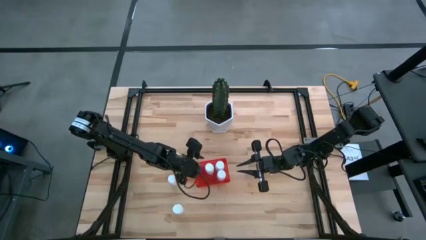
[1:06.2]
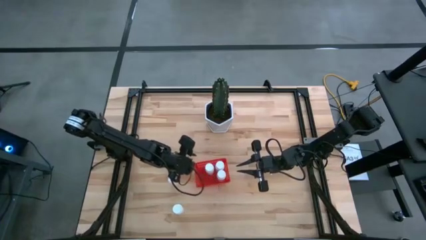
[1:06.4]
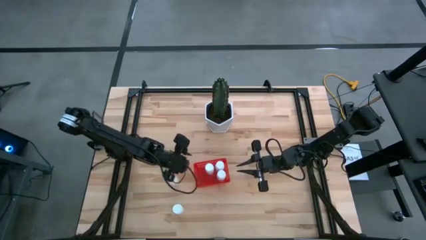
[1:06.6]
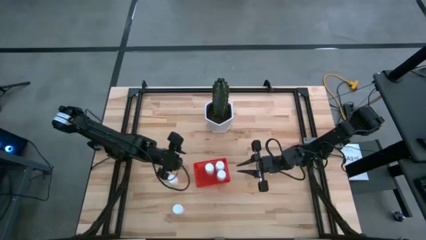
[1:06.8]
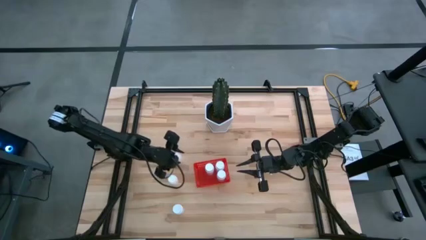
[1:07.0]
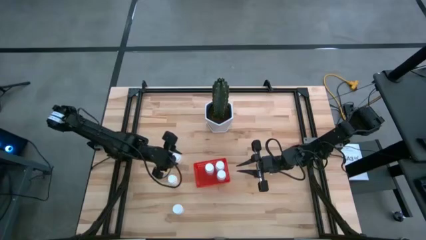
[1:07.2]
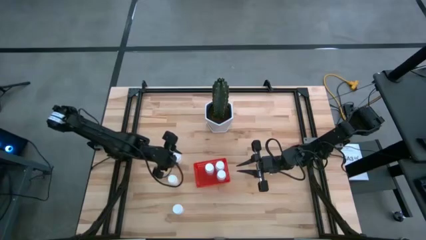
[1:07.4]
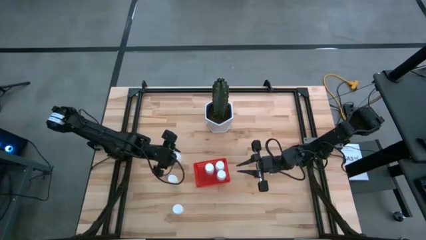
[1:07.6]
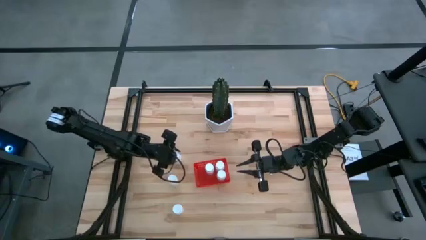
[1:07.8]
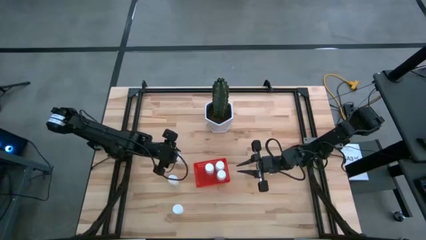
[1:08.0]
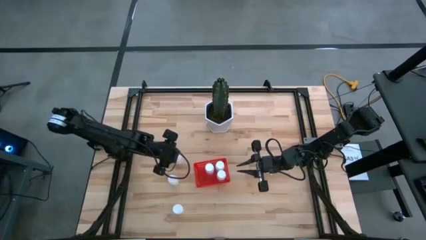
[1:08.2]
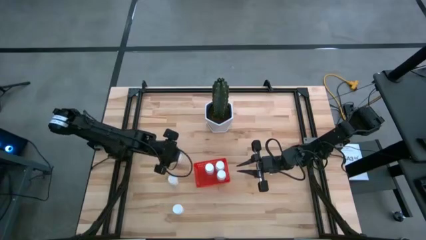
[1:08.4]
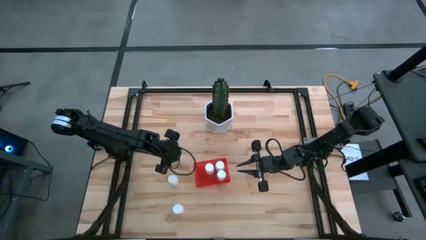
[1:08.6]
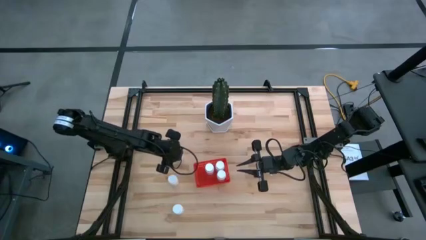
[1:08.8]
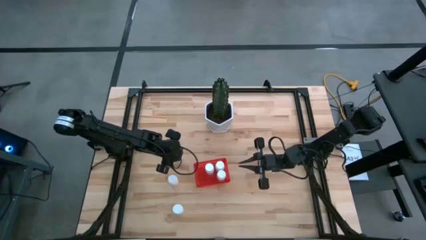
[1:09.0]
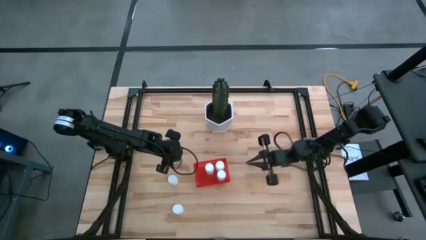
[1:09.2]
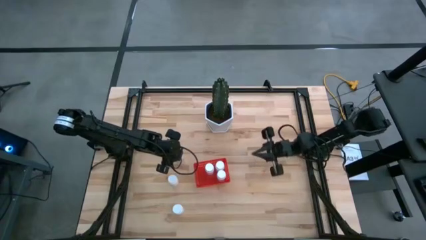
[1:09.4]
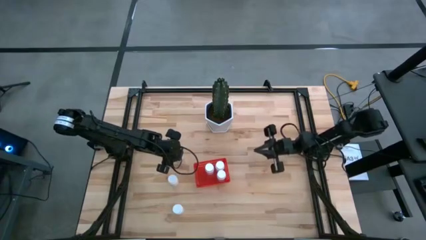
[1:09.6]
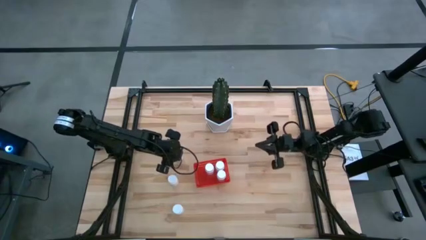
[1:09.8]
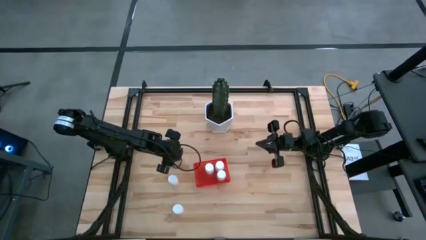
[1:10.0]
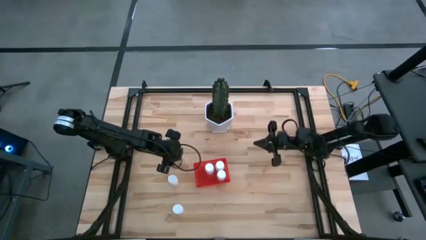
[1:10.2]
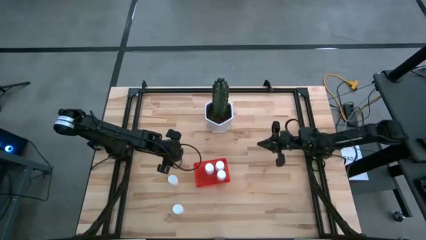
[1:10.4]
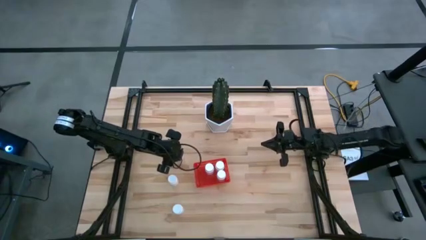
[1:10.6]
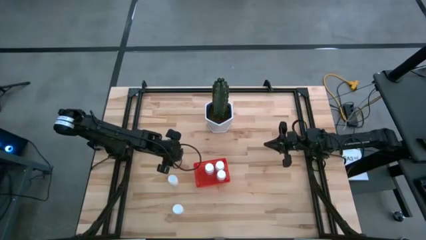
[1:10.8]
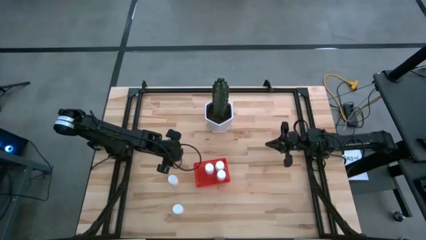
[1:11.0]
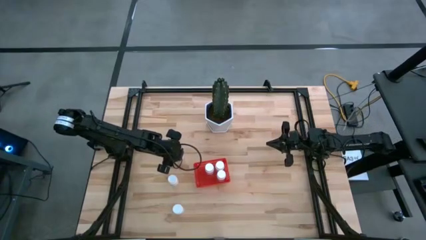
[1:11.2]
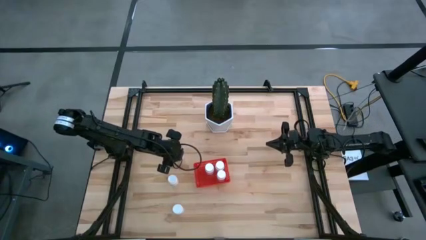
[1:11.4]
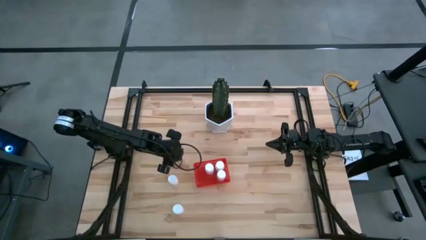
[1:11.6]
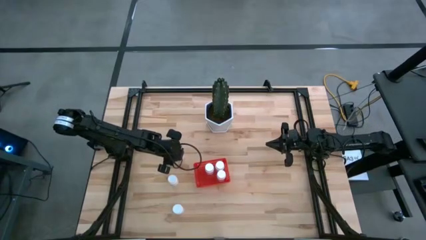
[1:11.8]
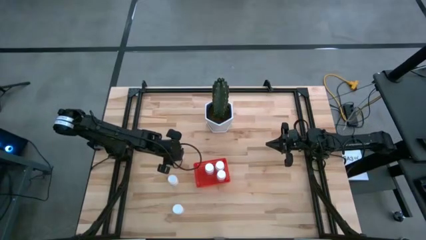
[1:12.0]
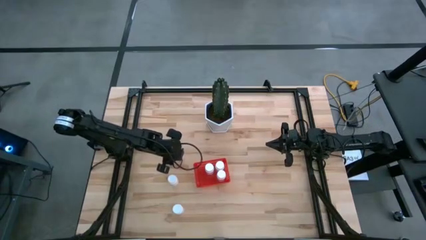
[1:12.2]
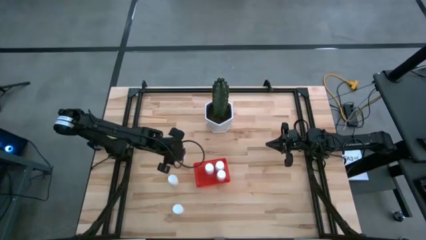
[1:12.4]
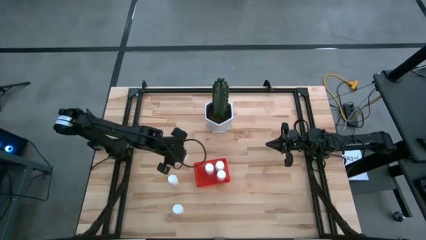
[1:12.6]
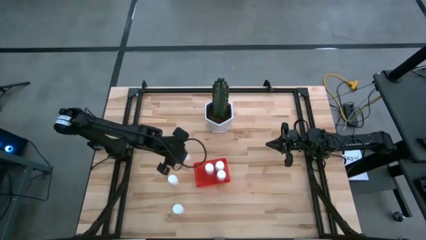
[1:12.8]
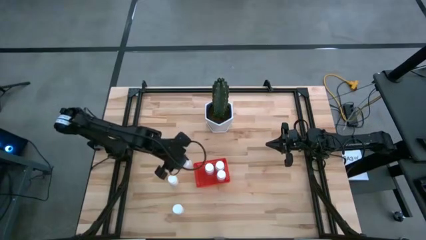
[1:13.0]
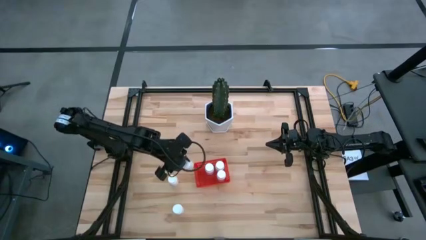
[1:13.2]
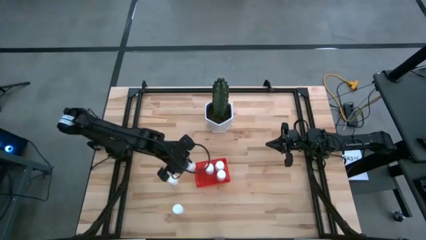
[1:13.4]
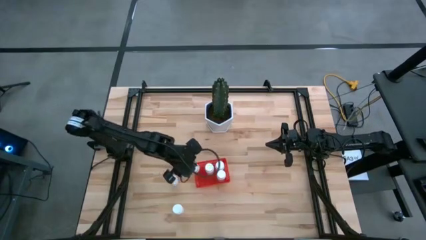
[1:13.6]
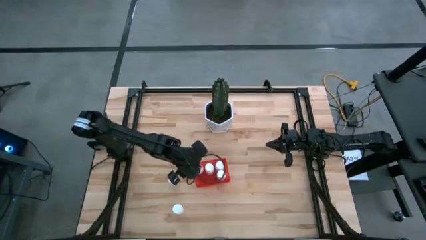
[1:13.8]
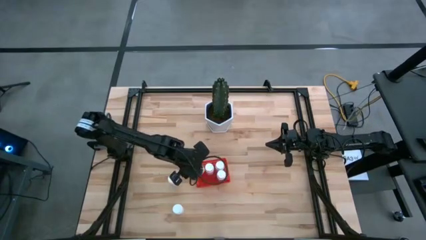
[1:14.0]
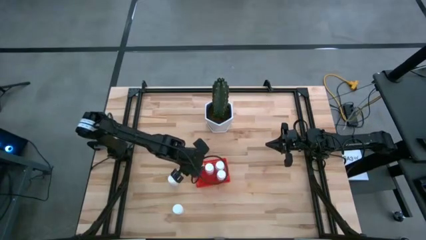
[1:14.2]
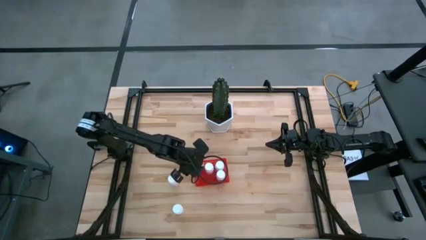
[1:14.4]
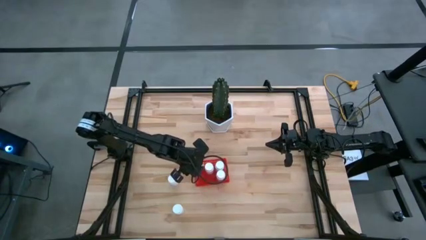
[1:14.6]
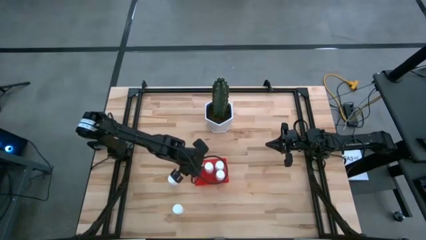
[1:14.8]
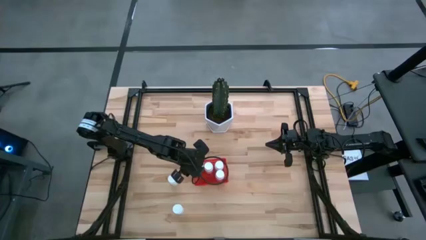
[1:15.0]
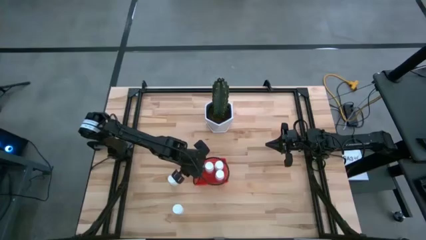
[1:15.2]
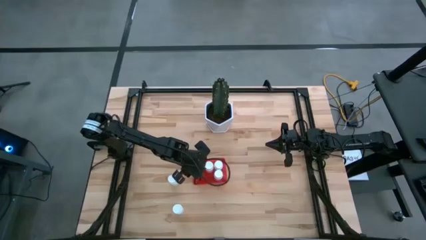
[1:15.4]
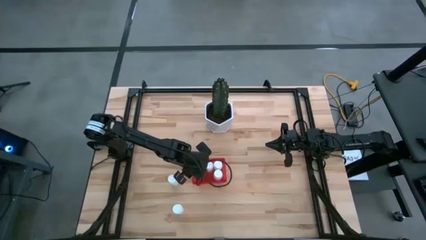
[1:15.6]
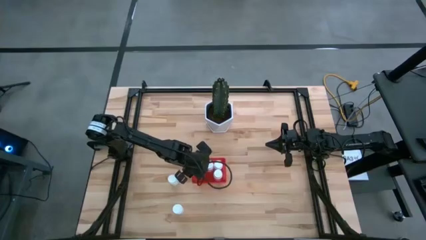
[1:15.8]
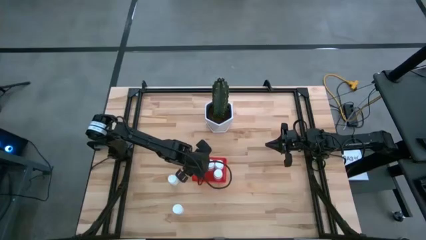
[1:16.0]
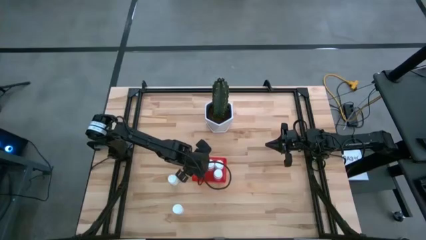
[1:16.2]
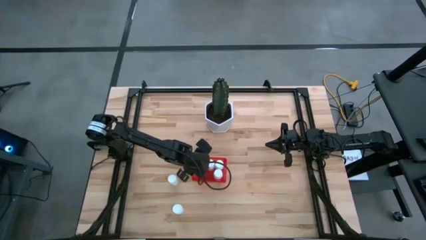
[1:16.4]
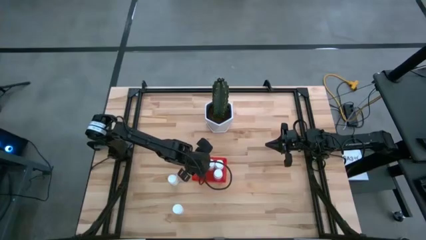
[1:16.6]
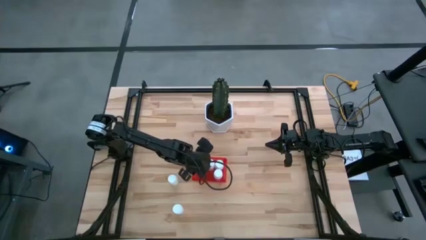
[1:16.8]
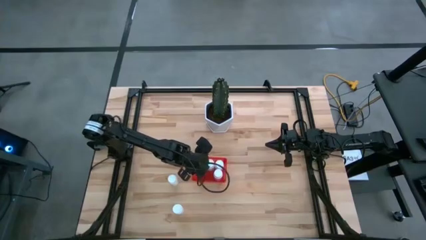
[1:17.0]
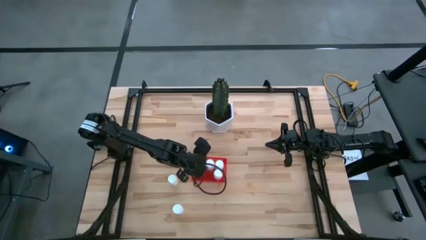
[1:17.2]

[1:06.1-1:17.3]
Task: Pick and place pill bottles into a basket
Put the white pill bottle into the red bin

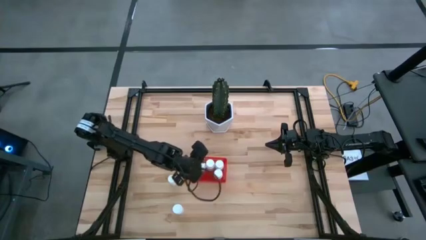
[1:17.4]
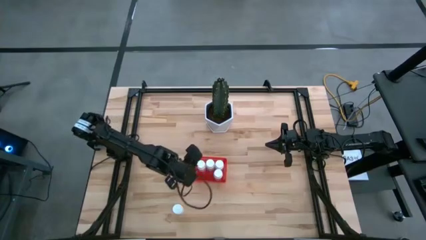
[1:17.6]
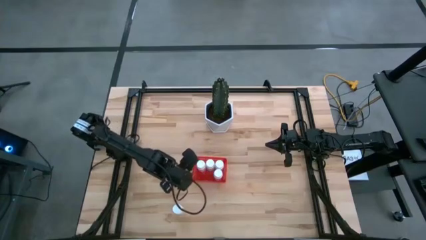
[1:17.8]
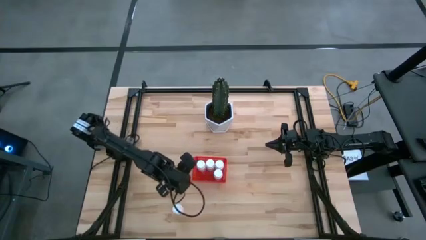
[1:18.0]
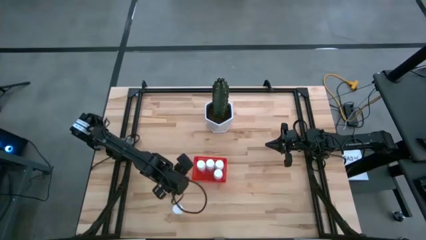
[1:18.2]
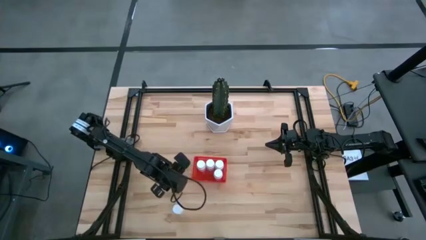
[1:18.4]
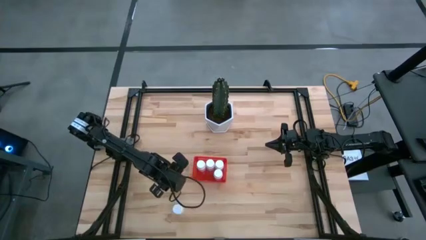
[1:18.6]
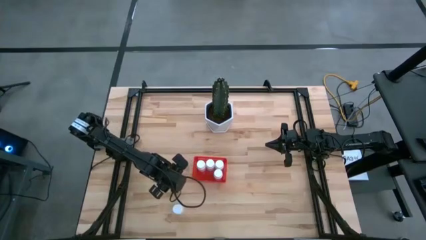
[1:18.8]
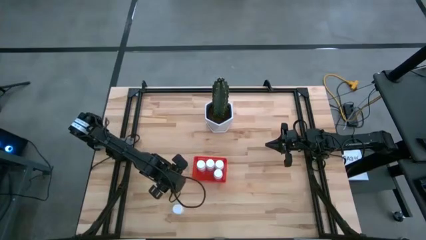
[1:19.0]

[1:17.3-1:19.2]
Put the white pill bottle into the red bin
